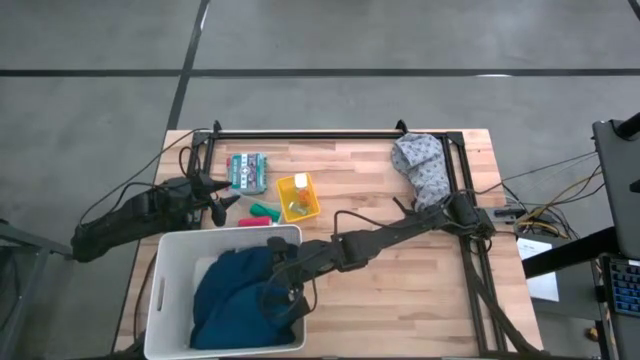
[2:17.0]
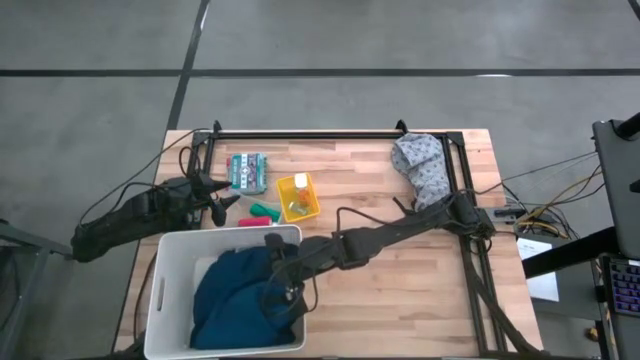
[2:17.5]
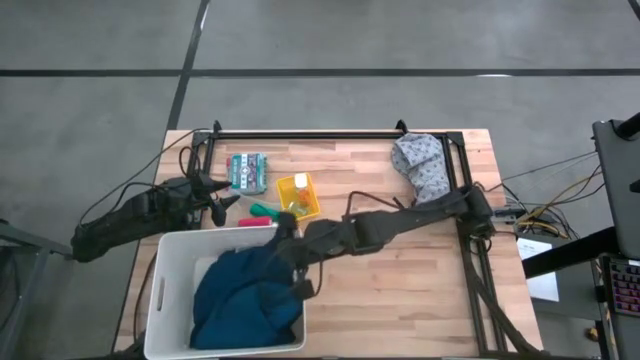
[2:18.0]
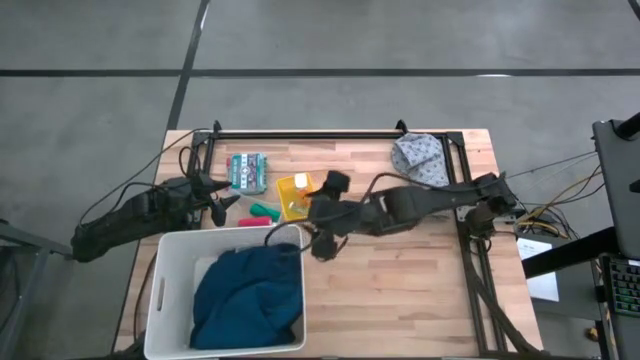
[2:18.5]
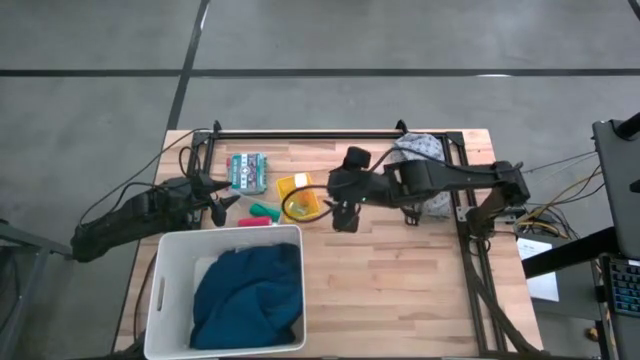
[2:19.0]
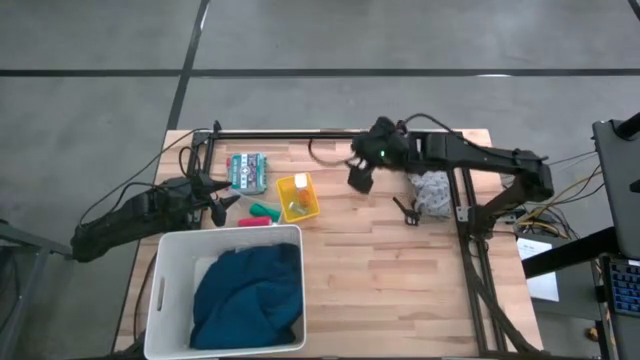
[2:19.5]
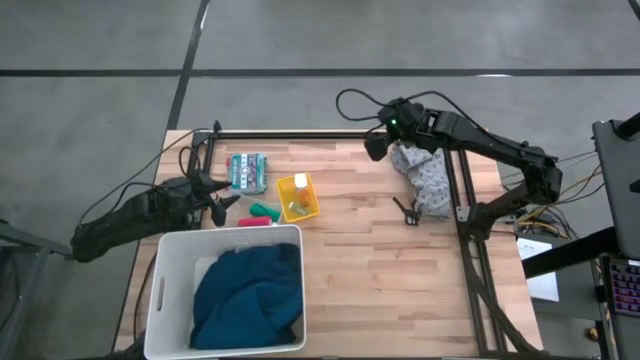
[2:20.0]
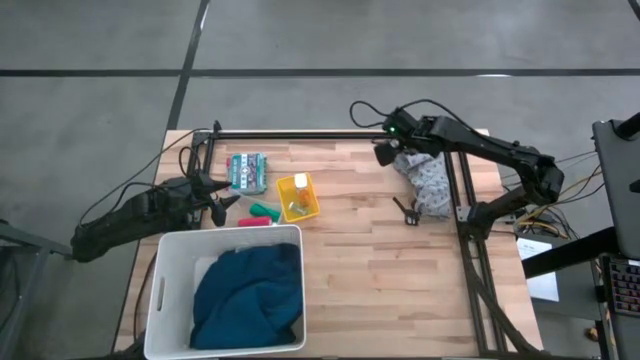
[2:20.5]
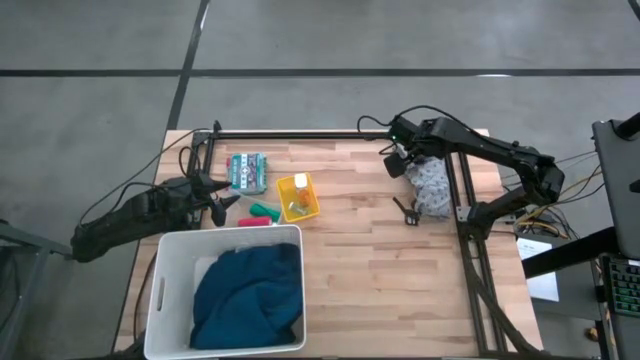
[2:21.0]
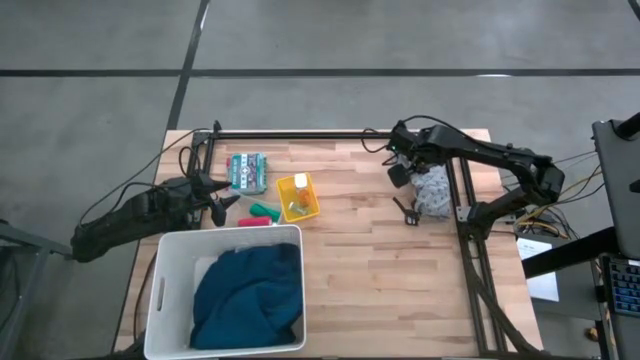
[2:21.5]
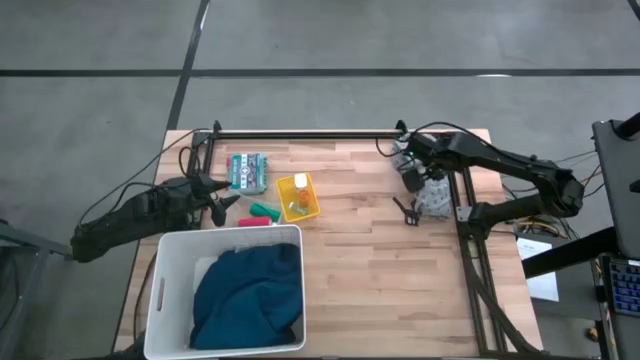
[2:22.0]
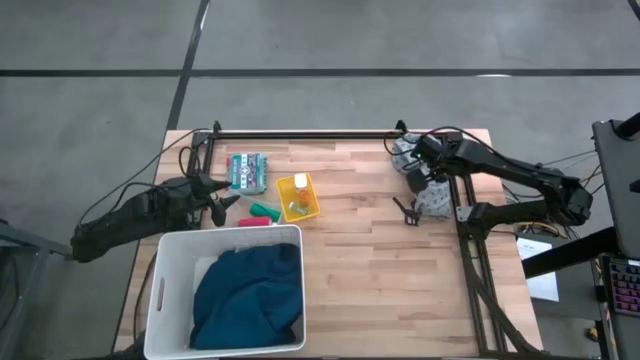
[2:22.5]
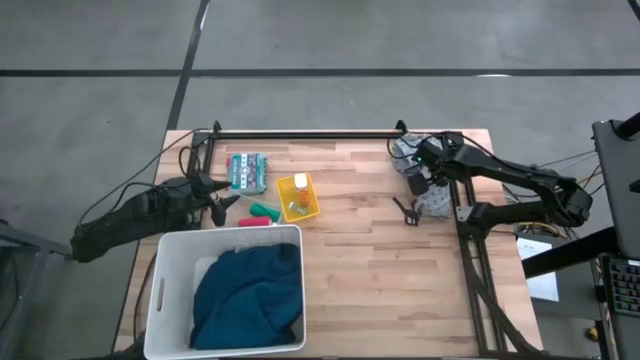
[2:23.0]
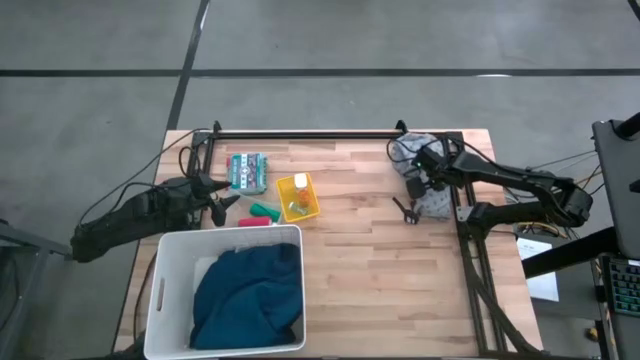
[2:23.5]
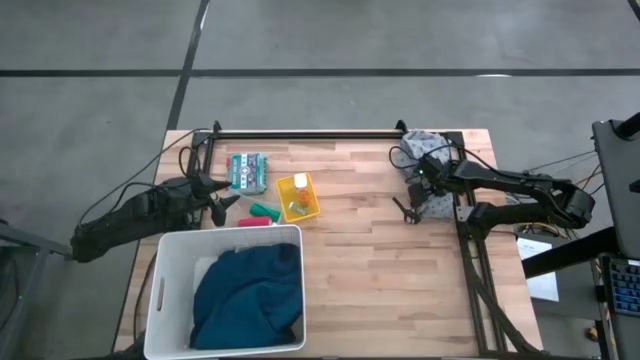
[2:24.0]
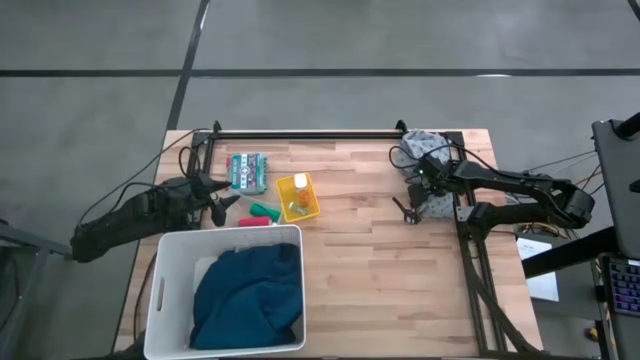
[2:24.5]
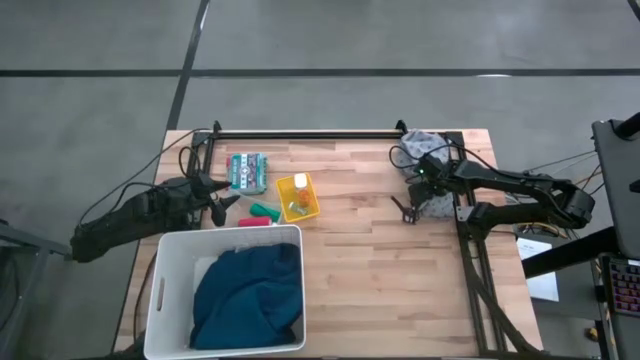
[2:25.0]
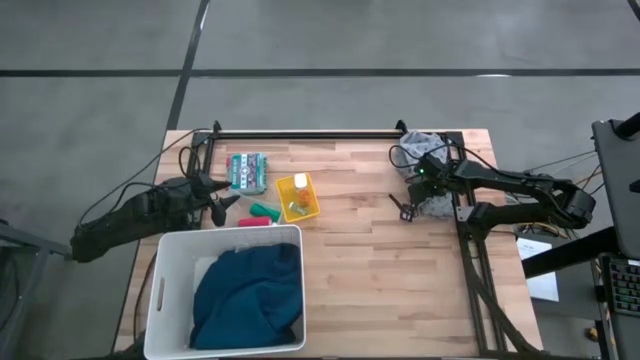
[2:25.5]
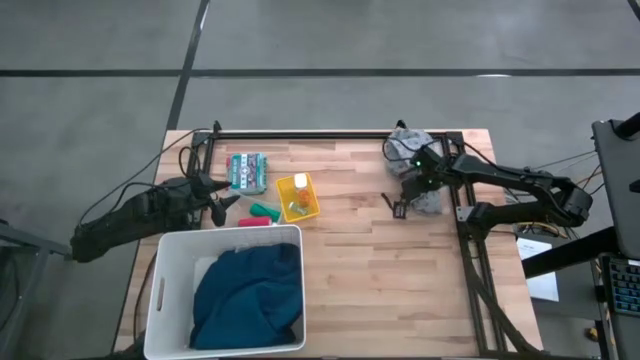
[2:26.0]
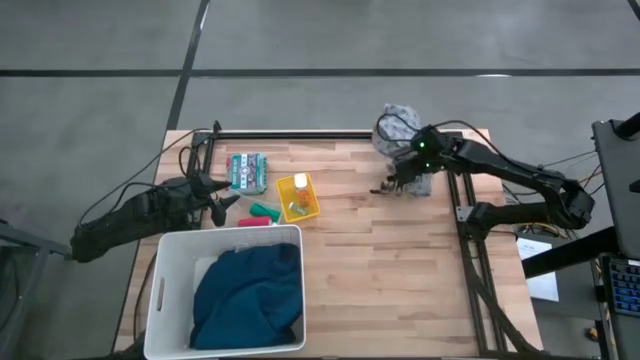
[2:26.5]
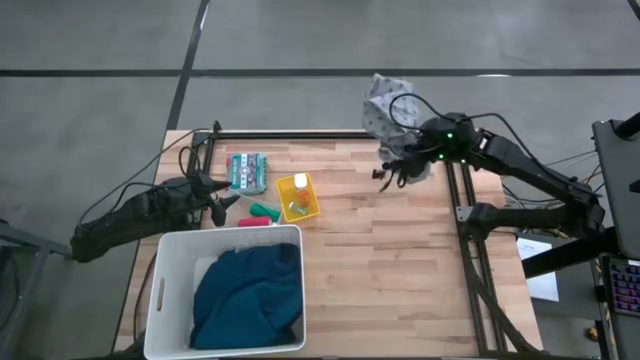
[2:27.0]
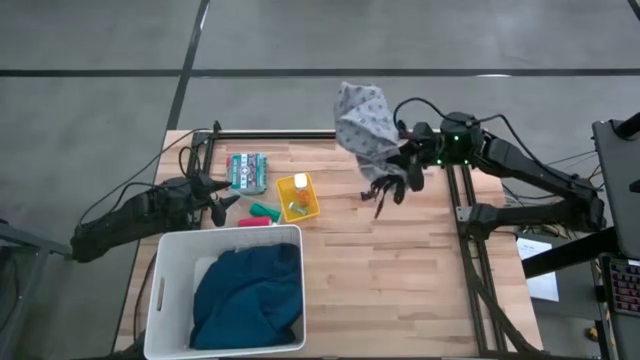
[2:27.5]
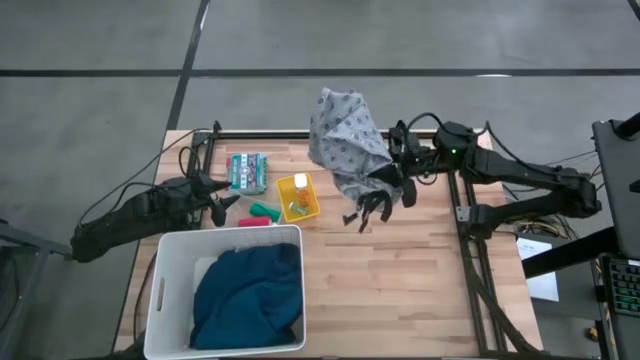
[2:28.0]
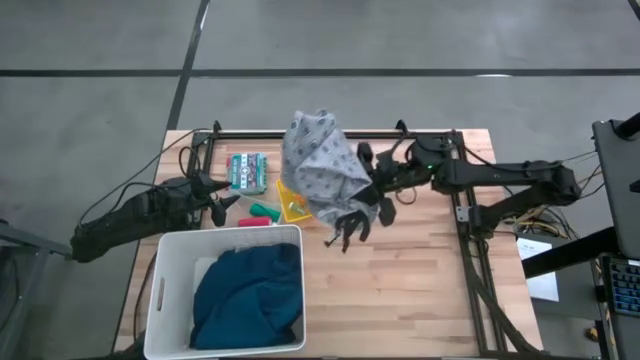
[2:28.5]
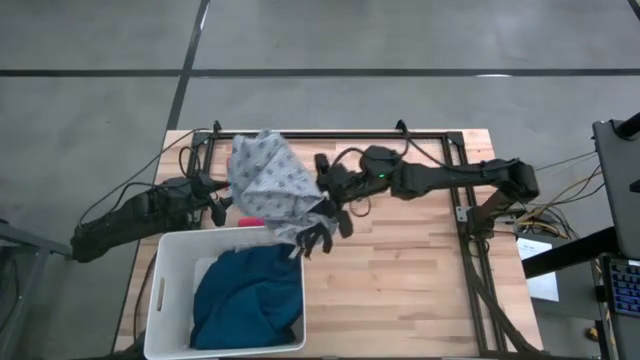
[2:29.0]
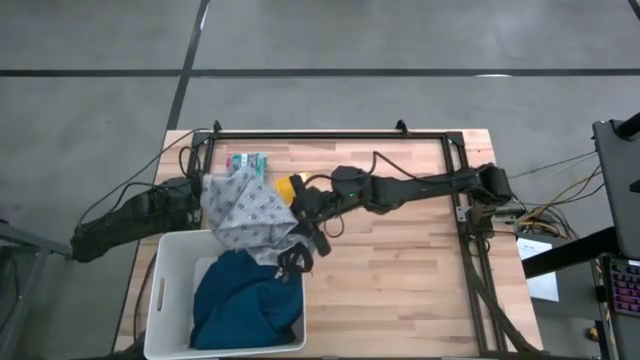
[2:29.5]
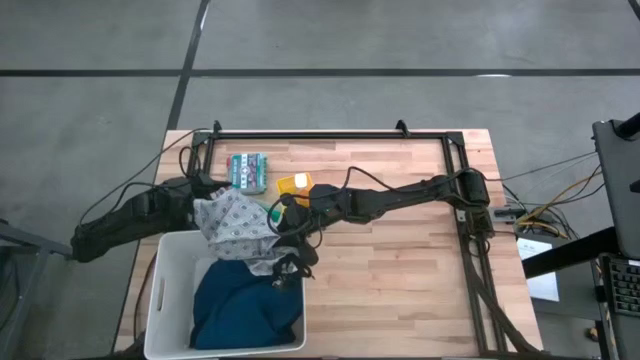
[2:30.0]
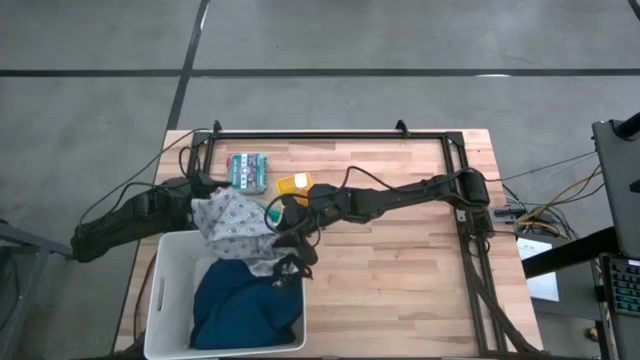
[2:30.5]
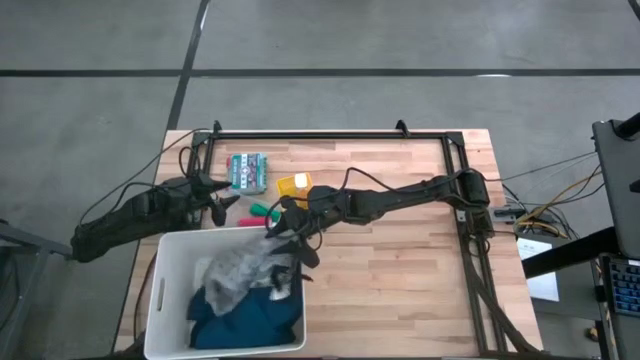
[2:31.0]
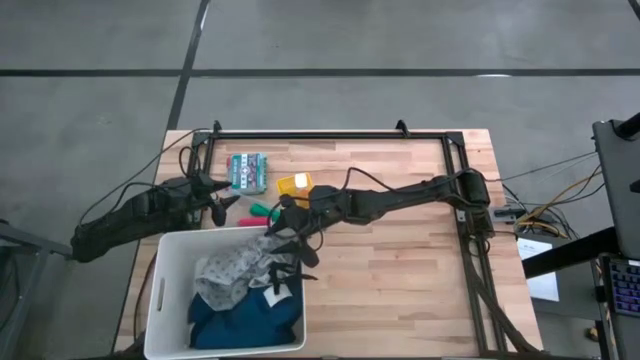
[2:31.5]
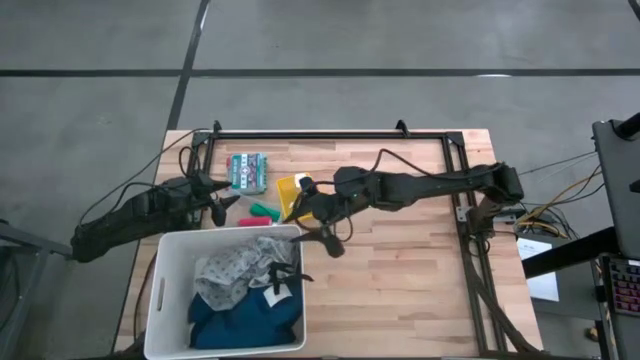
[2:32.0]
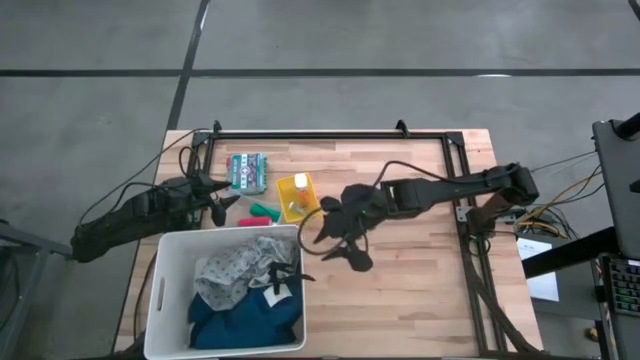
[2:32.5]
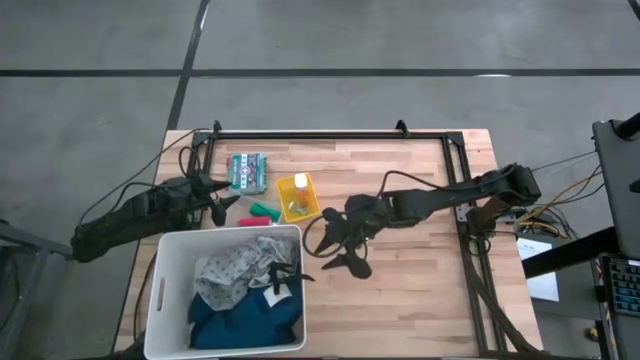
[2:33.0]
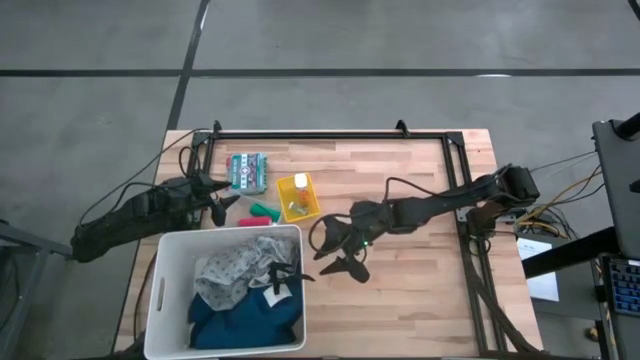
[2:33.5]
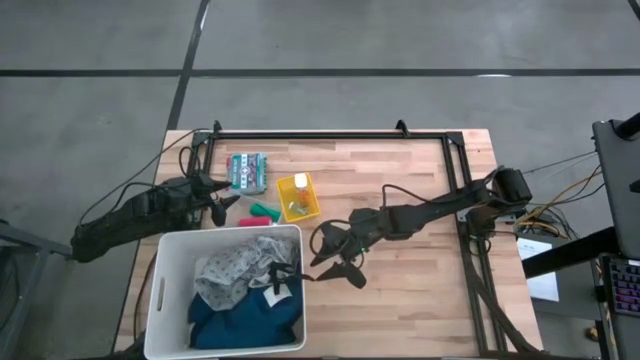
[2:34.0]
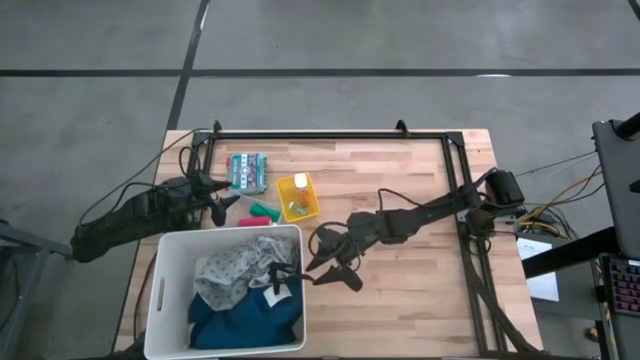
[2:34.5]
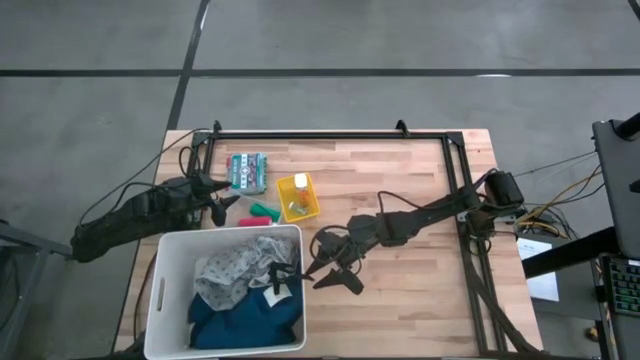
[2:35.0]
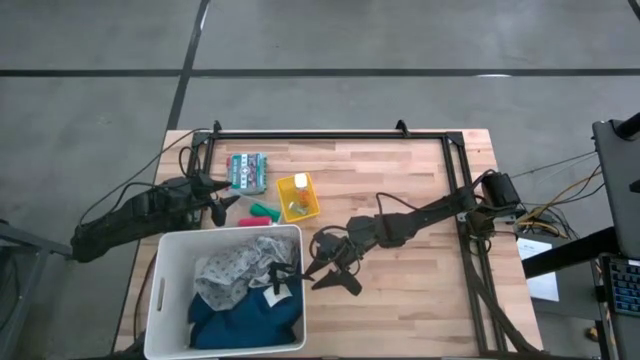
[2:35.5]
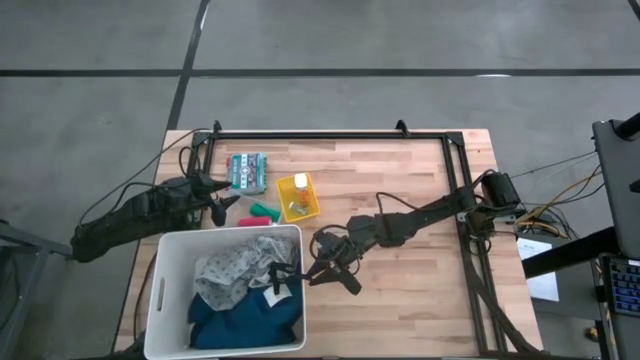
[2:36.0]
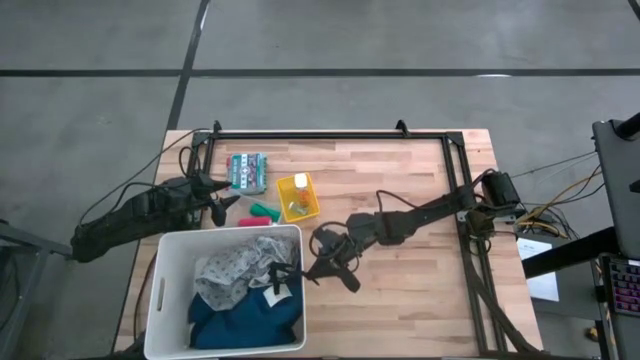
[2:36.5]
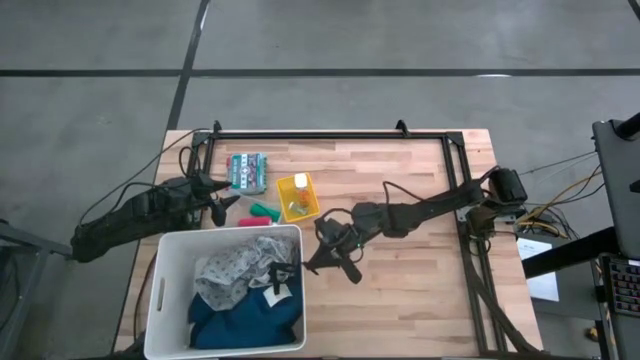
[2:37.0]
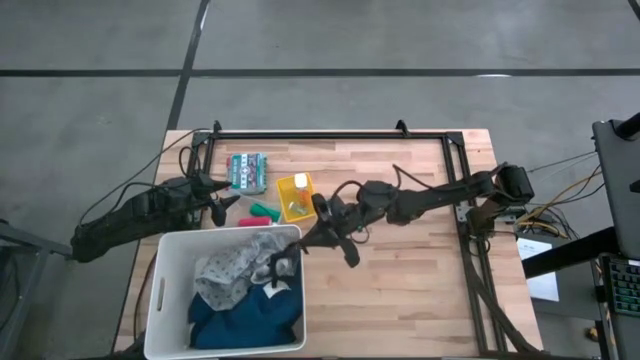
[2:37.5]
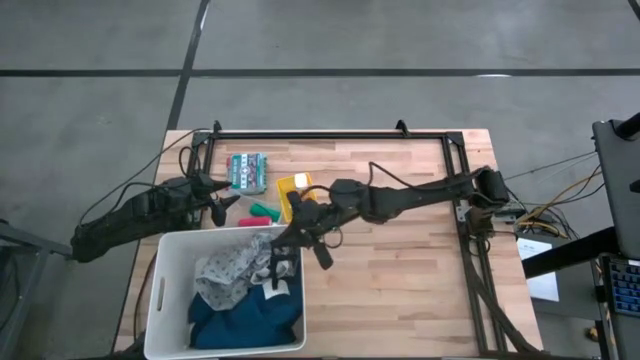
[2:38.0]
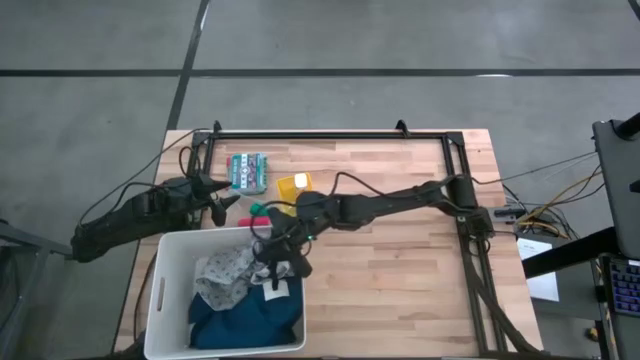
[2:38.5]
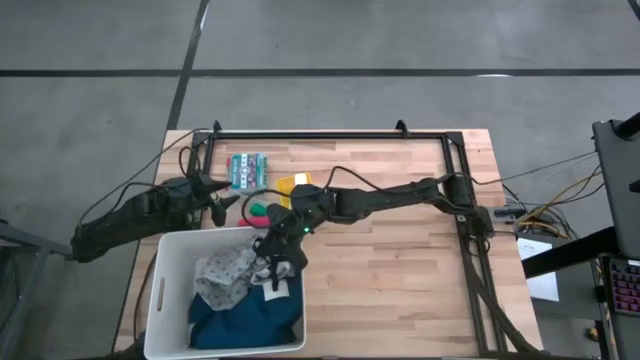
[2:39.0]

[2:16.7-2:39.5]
Task: Pick & place medical supplies in basket/bin
Put the white patient gown into the white bin
